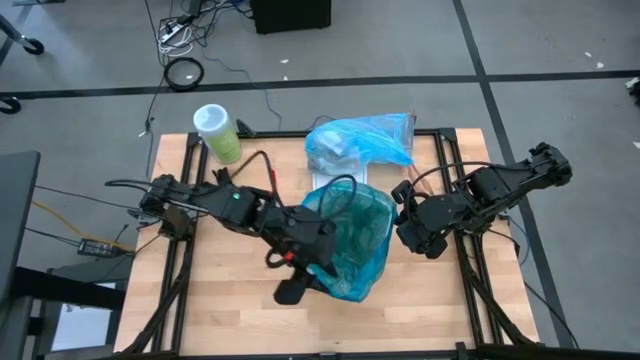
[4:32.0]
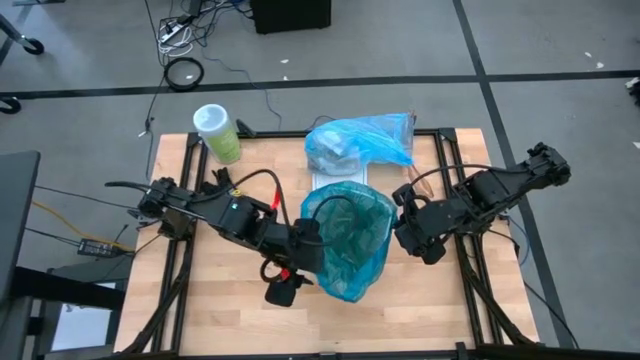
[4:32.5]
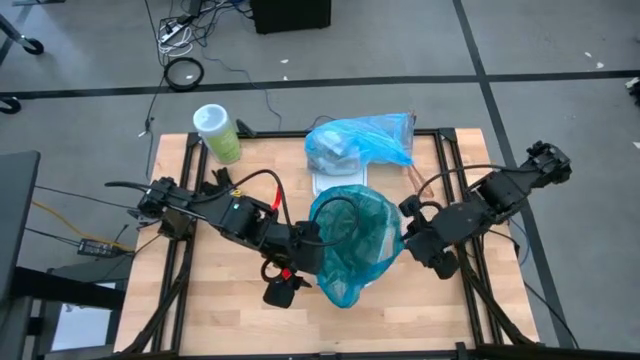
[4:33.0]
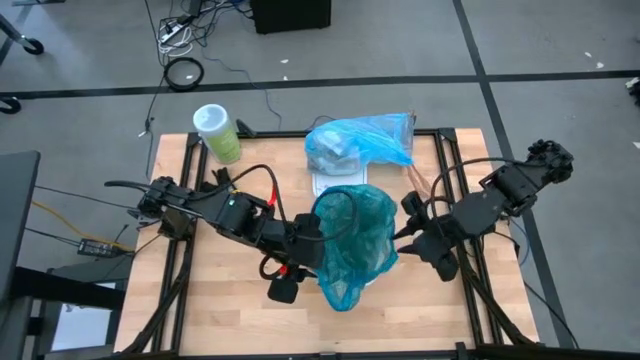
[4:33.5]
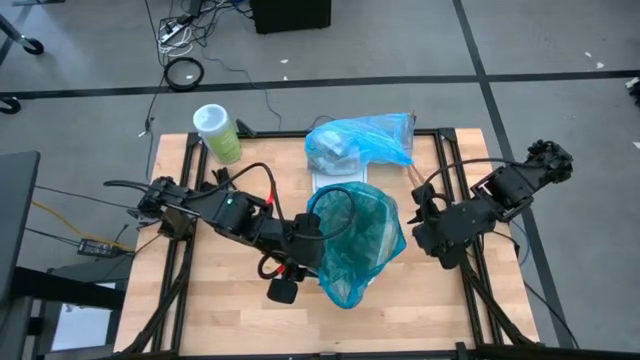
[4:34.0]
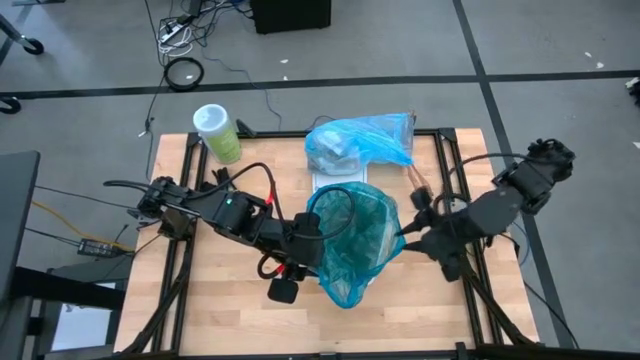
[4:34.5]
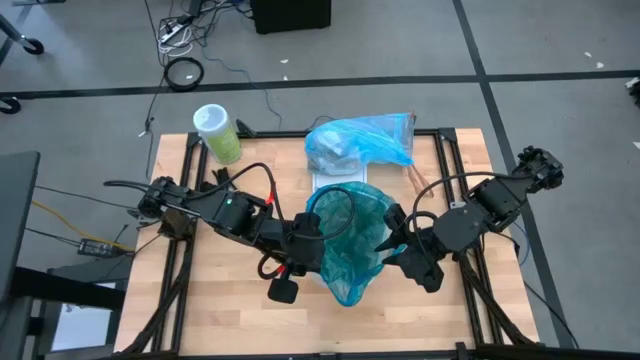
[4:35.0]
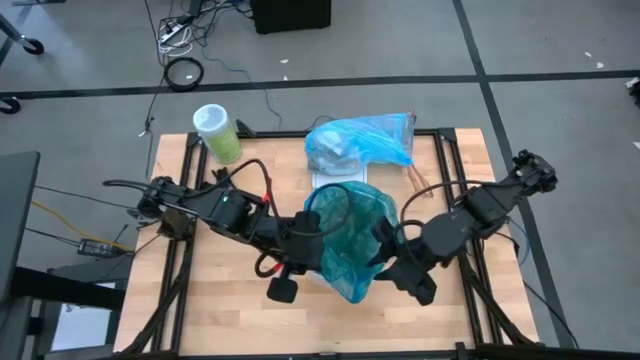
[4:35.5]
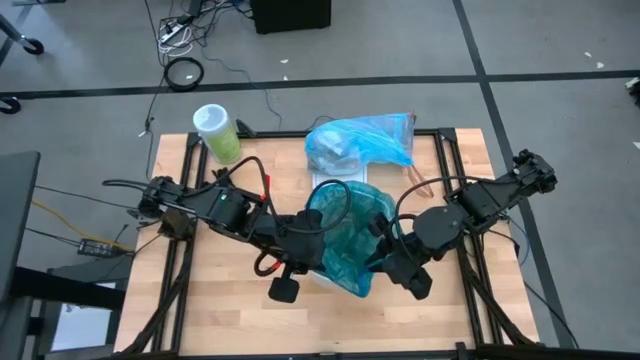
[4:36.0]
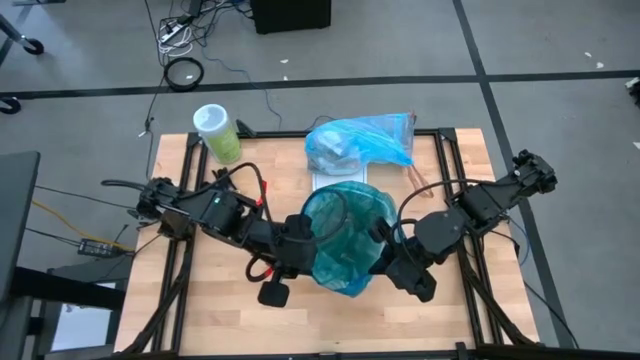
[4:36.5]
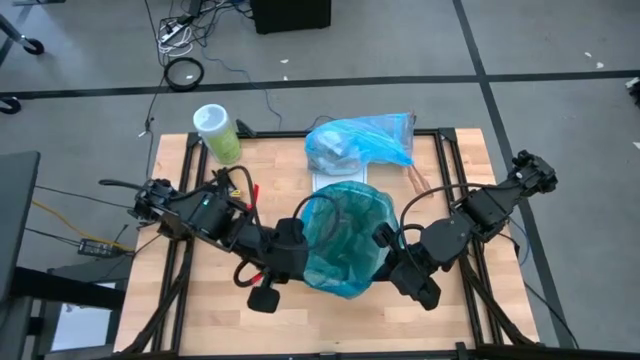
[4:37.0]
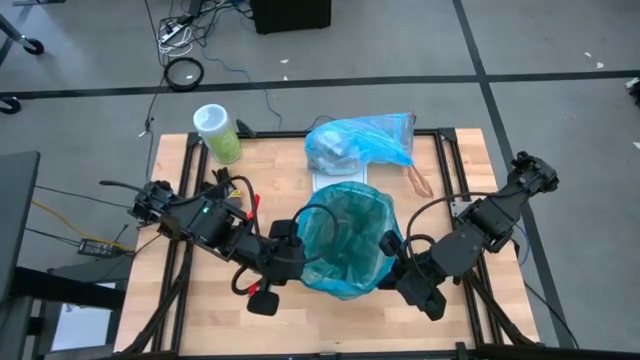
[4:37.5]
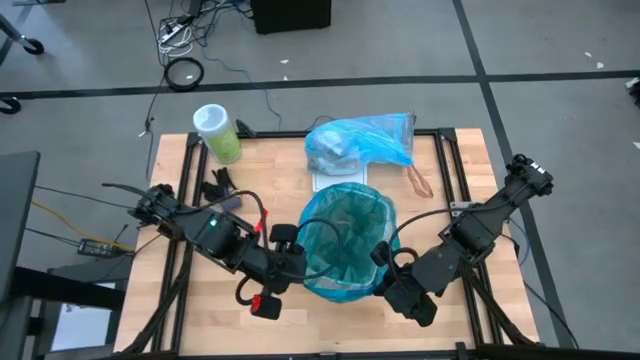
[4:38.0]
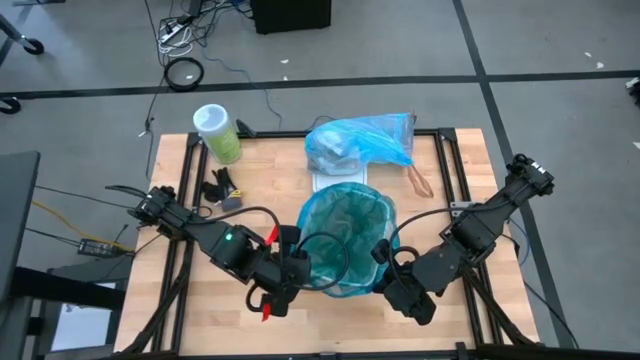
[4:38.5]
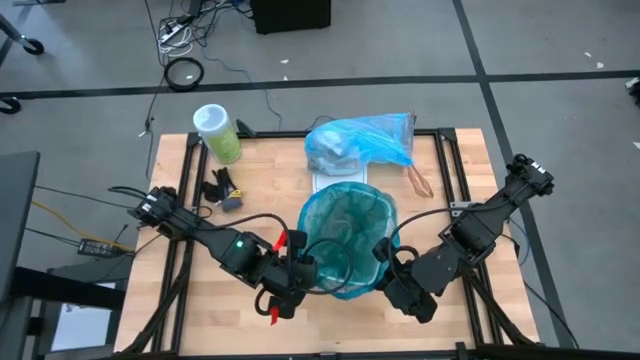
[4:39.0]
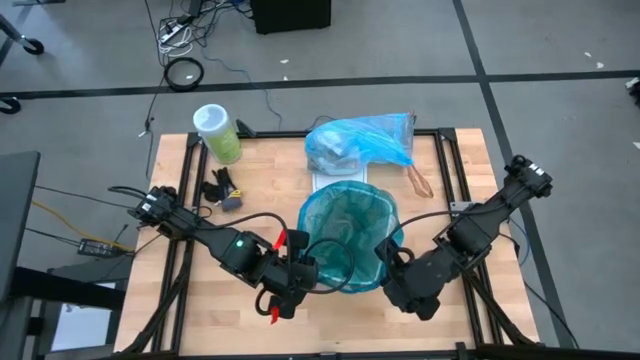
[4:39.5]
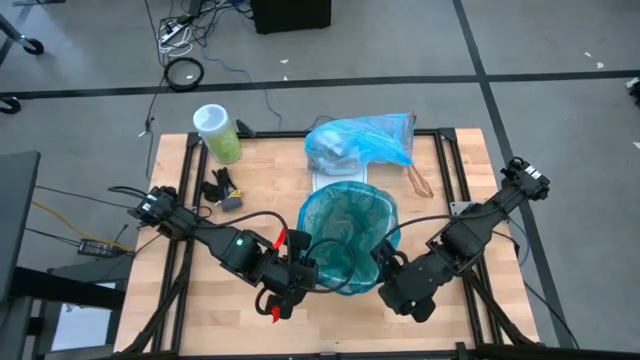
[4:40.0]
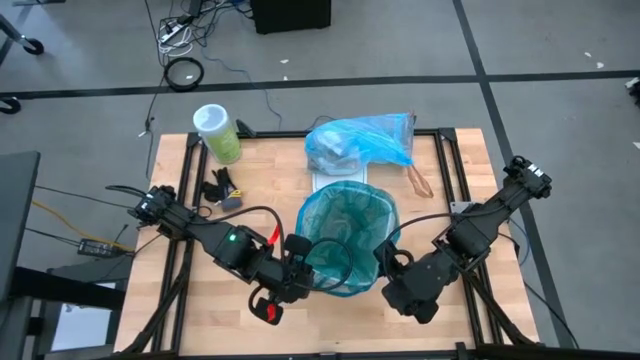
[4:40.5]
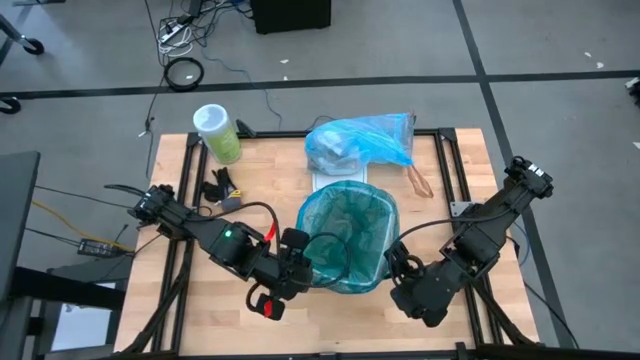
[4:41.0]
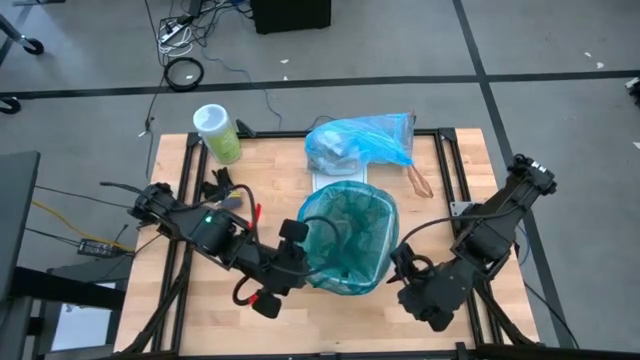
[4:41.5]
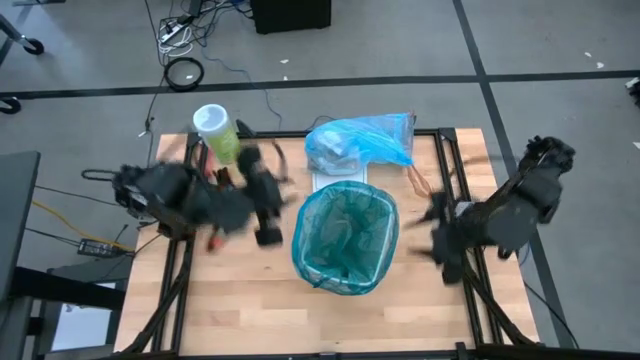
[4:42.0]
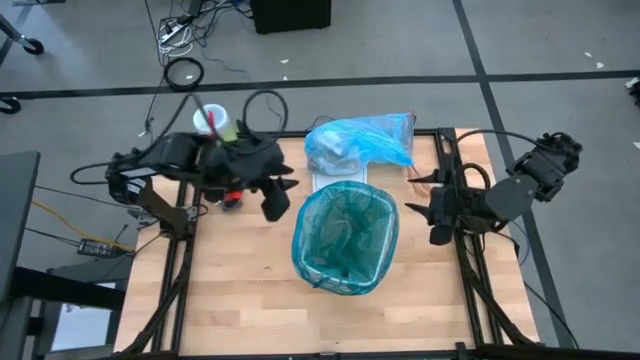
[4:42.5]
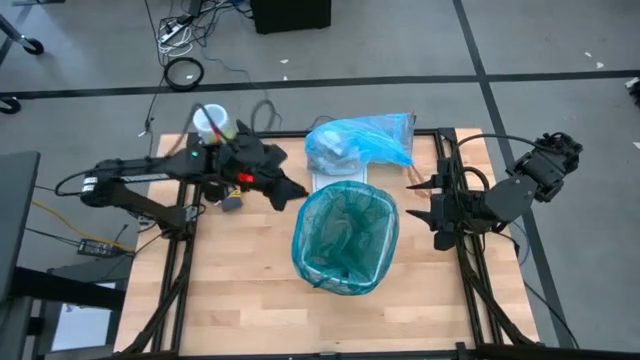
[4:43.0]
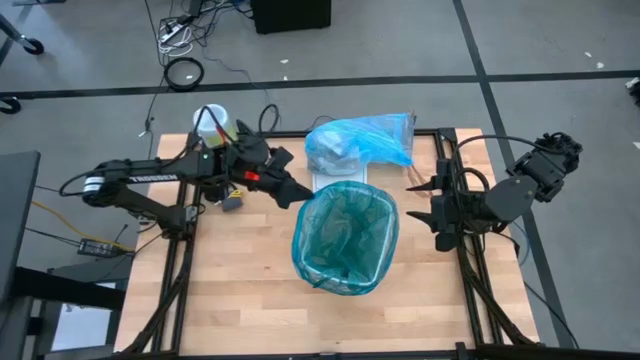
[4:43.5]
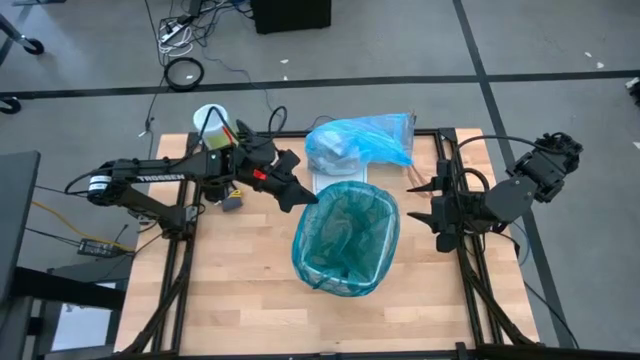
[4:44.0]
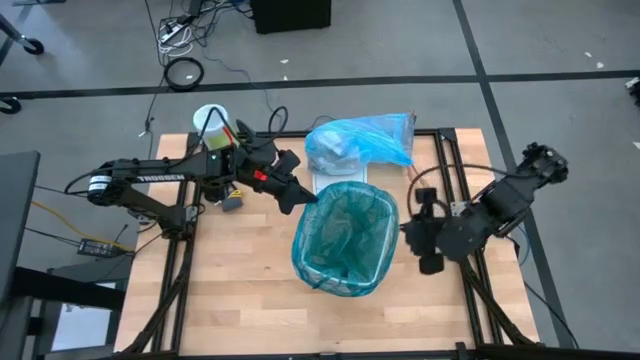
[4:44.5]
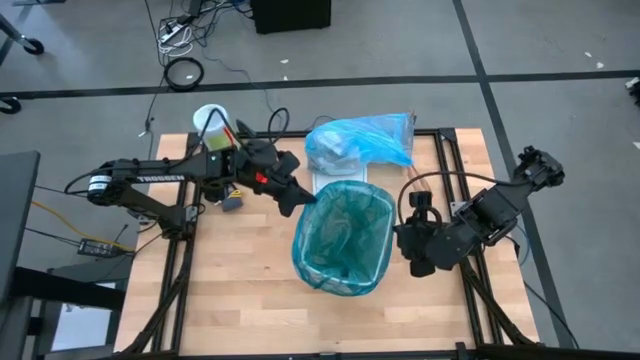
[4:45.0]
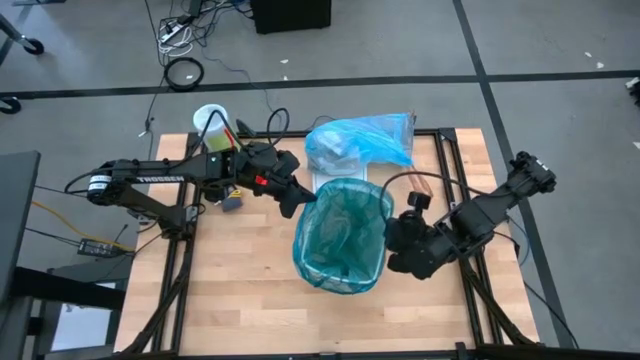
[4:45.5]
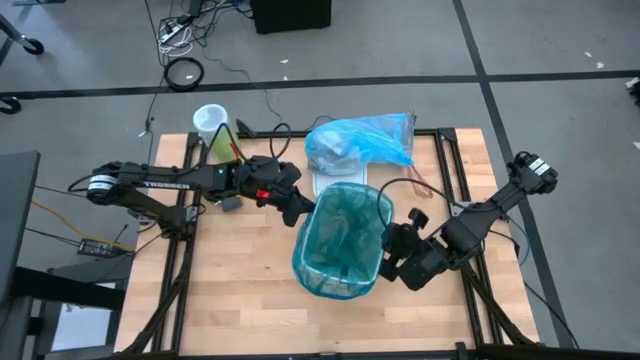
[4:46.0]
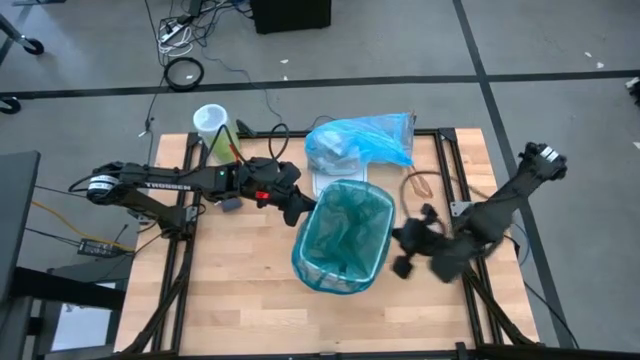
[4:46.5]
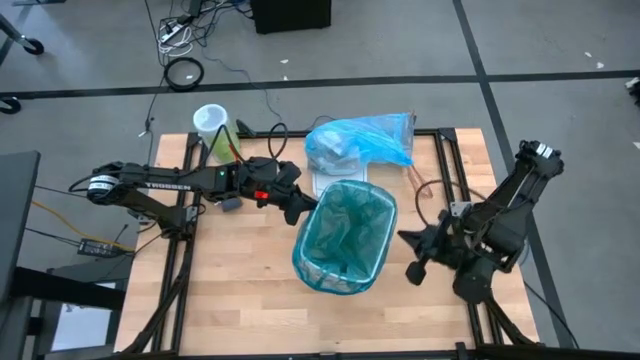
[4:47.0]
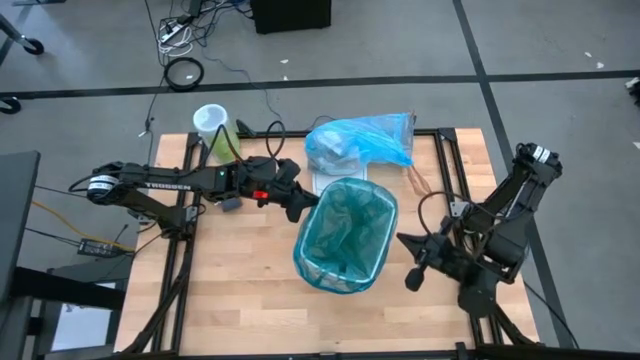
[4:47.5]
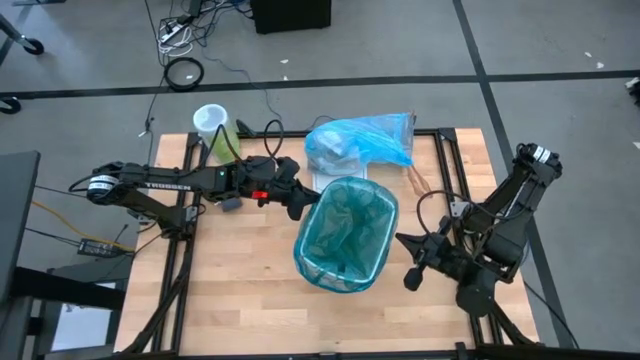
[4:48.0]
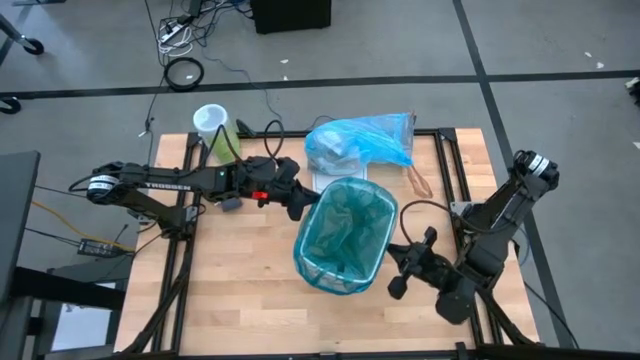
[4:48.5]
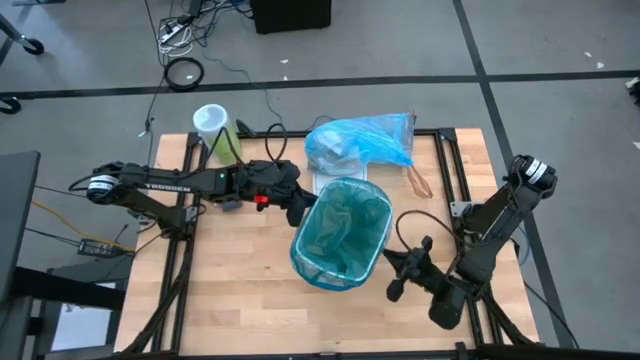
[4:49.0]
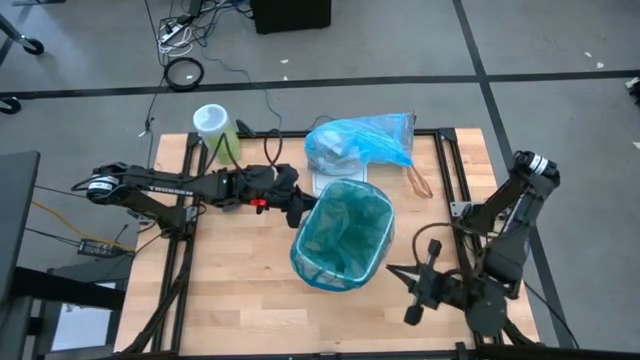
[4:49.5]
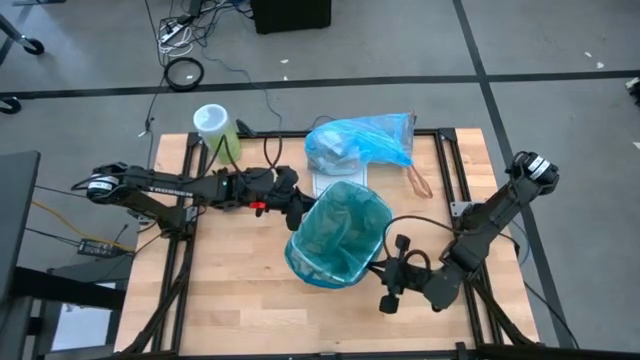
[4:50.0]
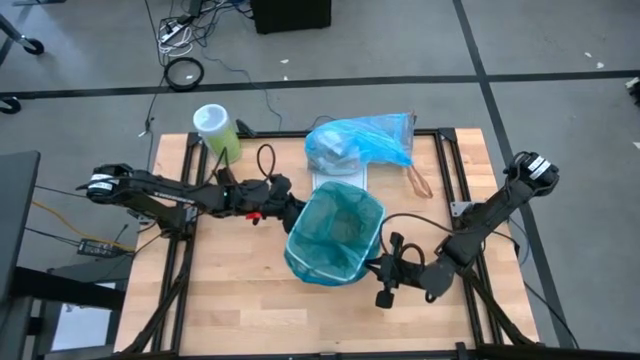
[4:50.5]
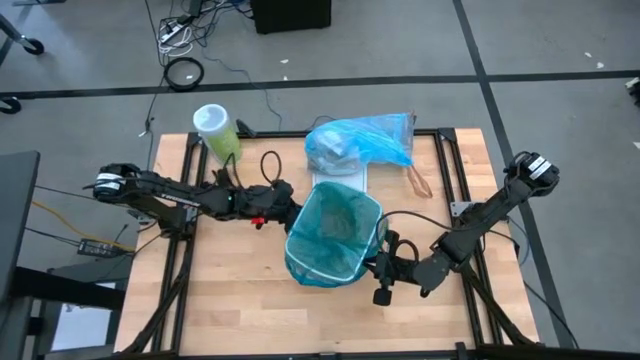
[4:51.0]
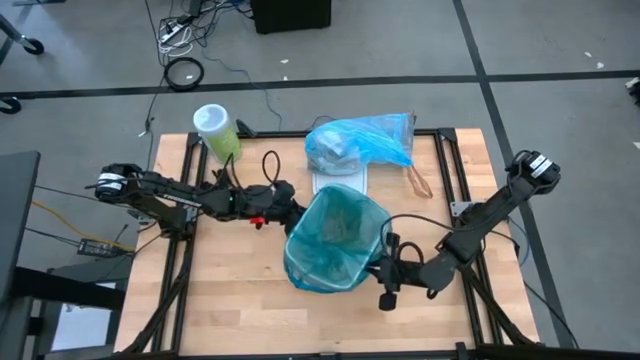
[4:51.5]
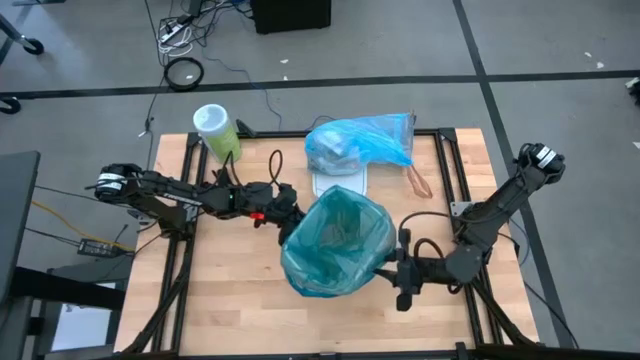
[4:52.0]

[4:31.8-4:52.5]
Task: place trash/remove bag and relplace
Insert the blue trash bag into the white trash bin
